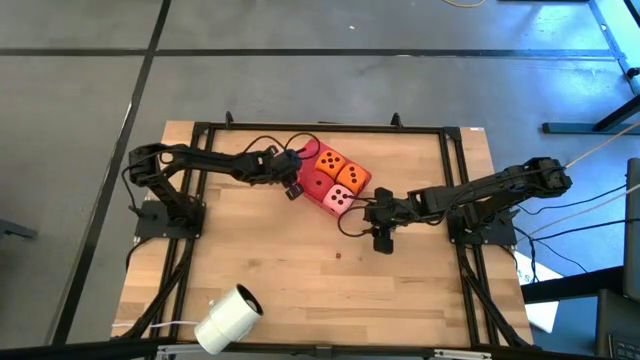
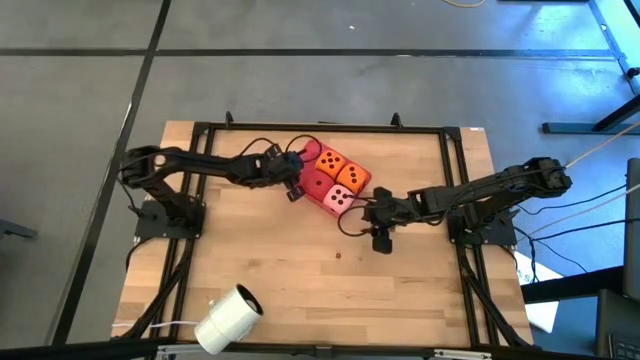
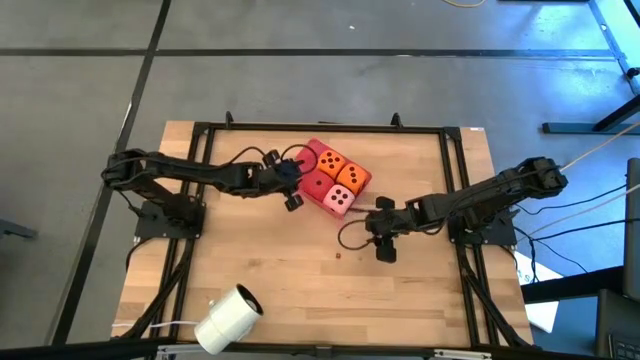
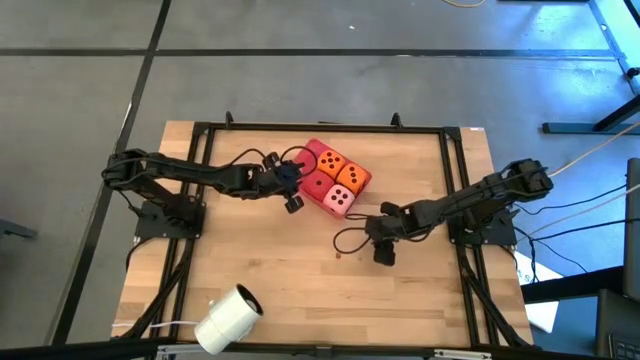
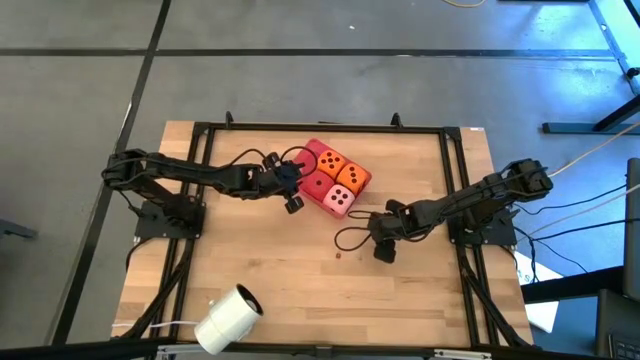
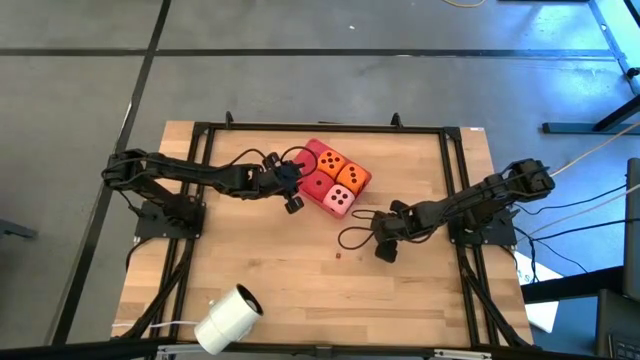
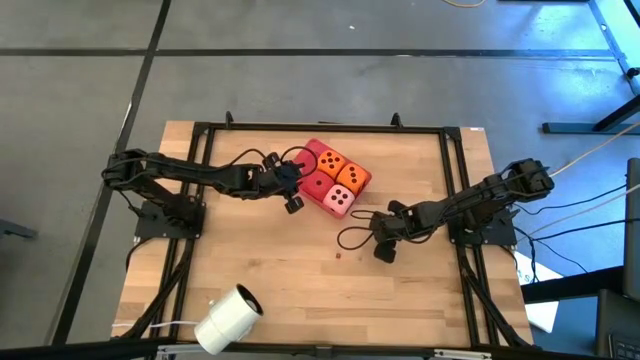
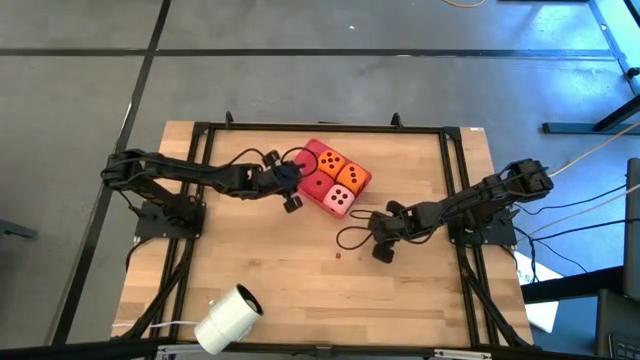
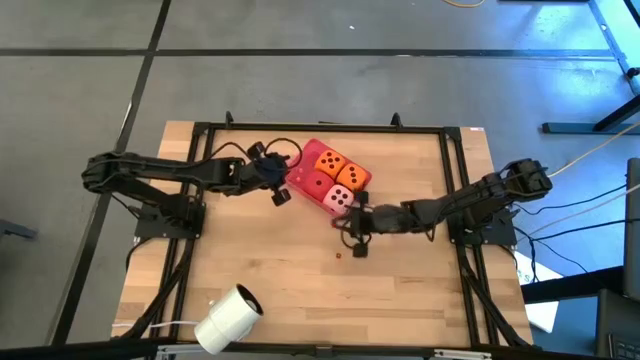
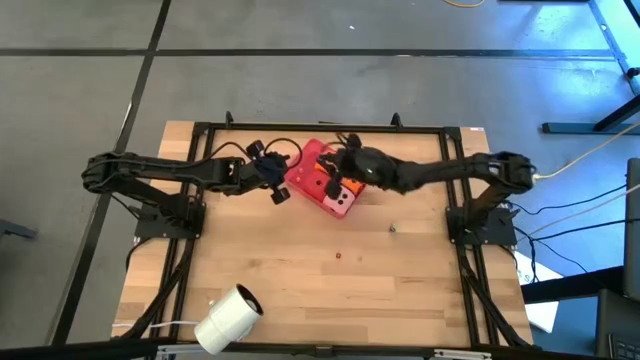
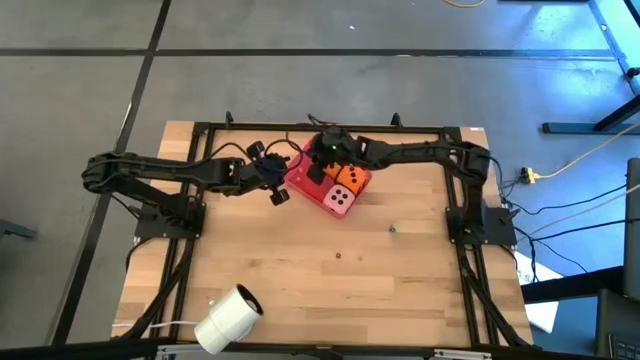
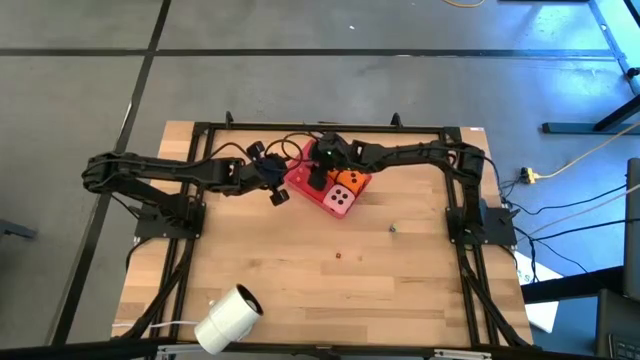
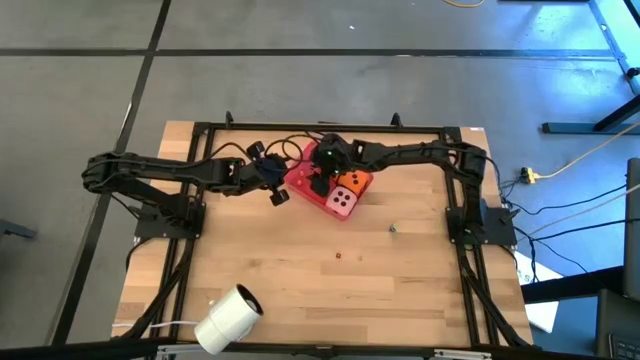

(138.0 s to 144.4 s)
Task: Pick & Place Dice
Put the left small blue die into the red bin

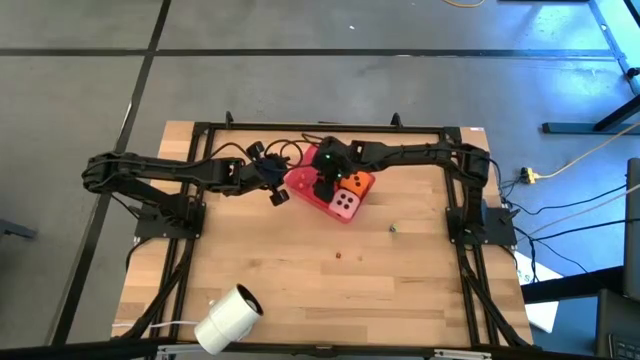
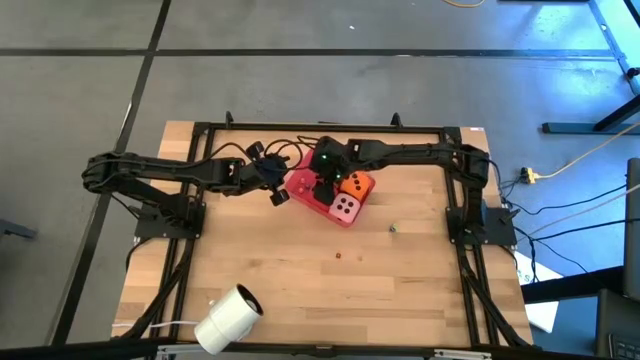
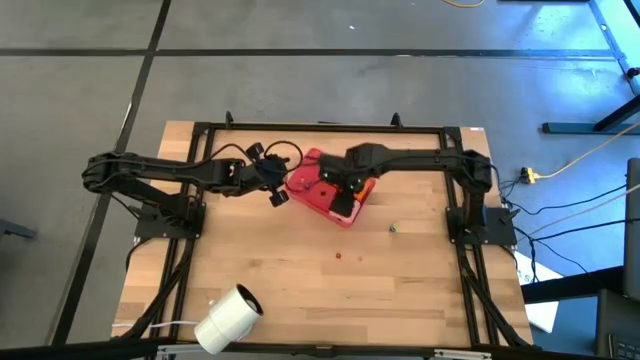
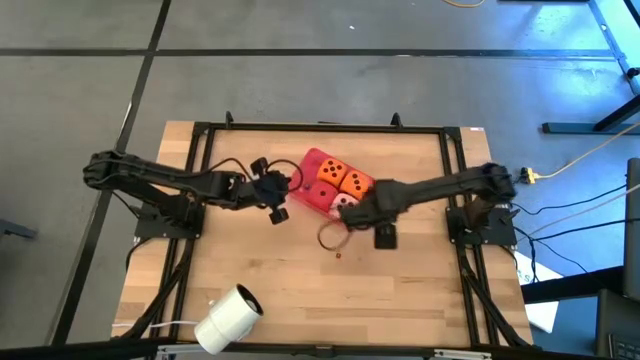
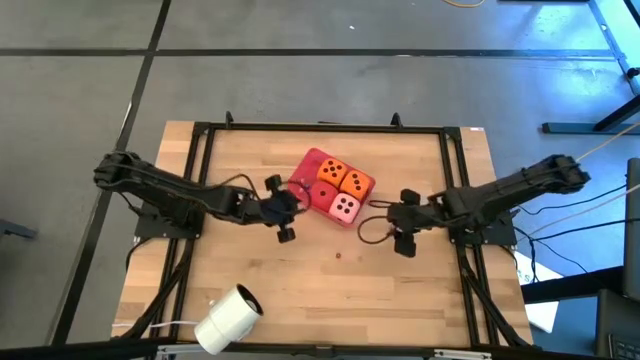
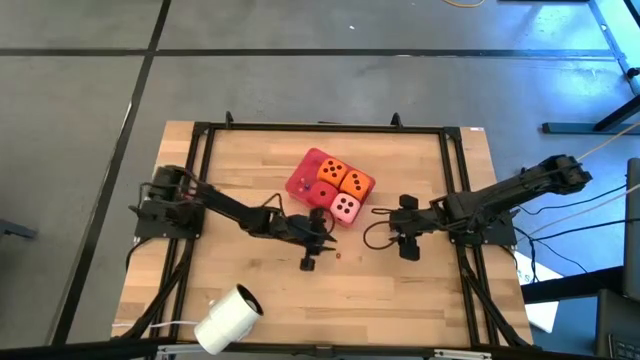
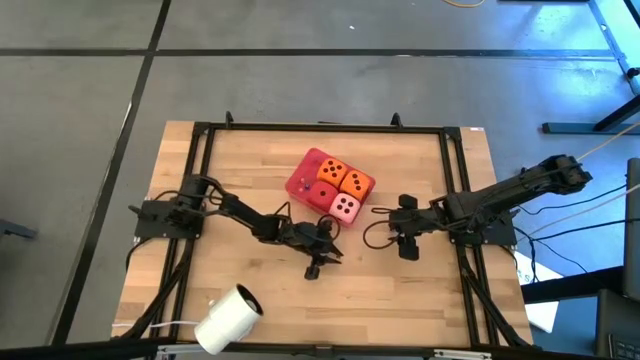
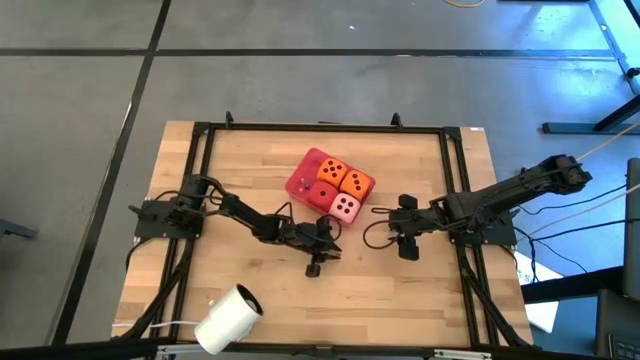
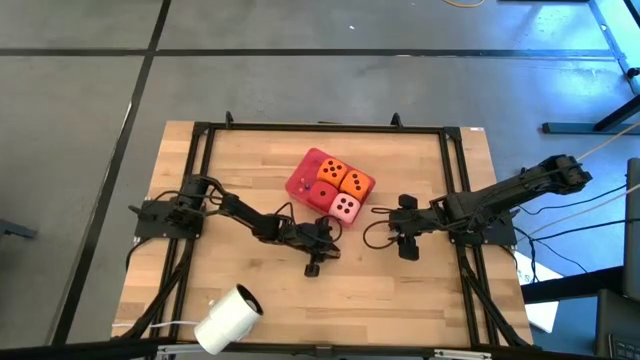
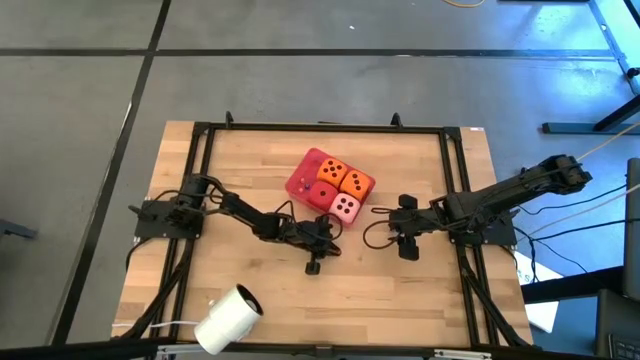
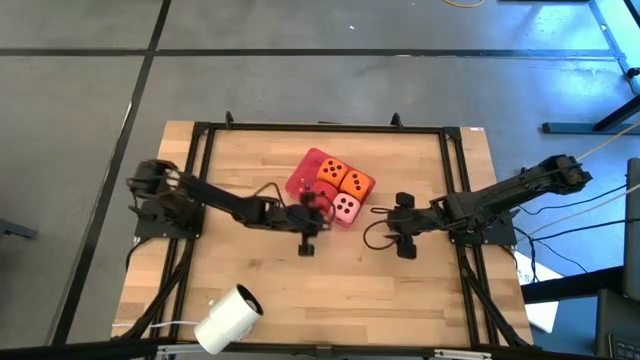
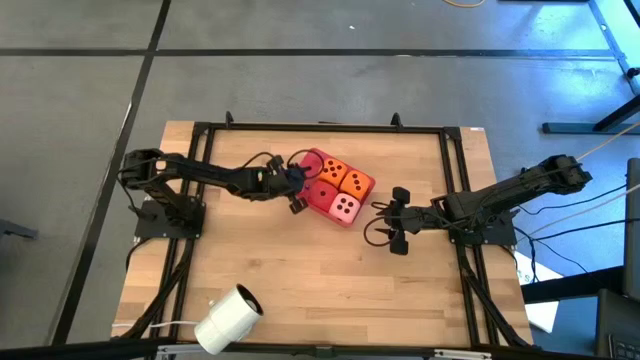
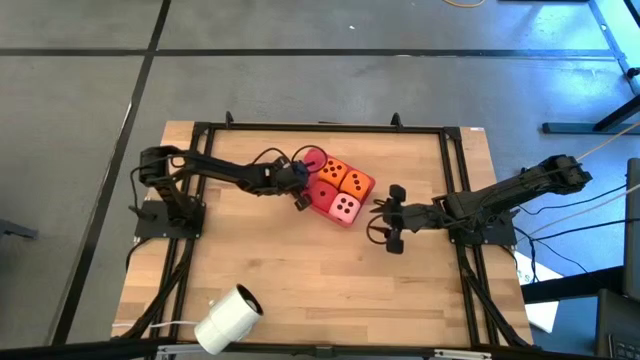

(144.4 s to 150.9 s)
Put the small red die into the red bin

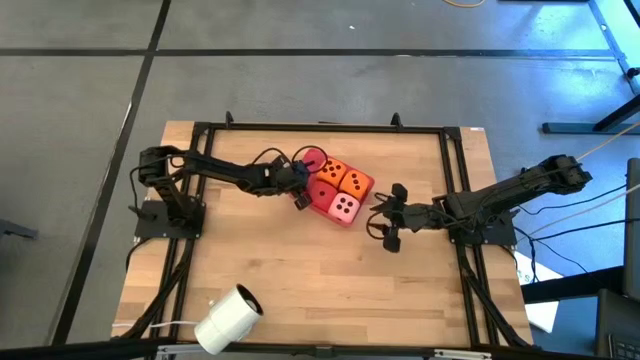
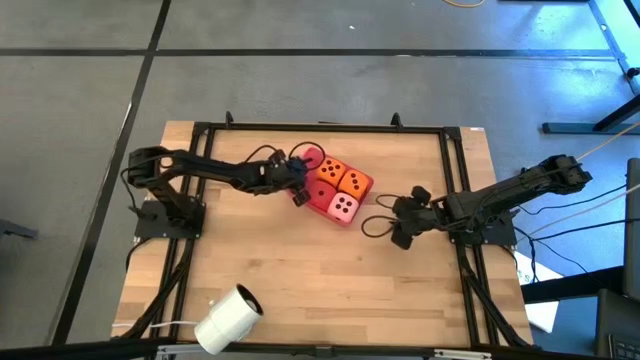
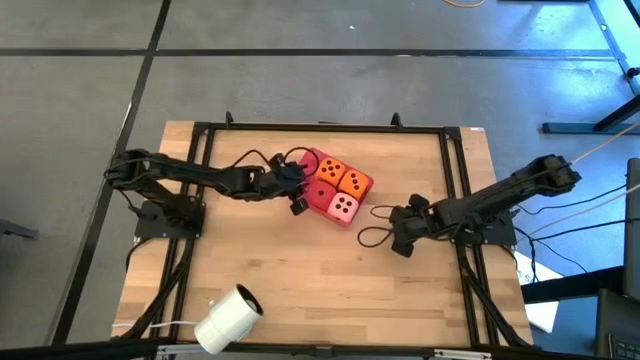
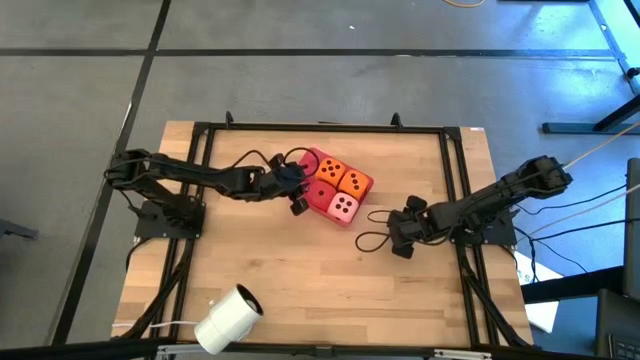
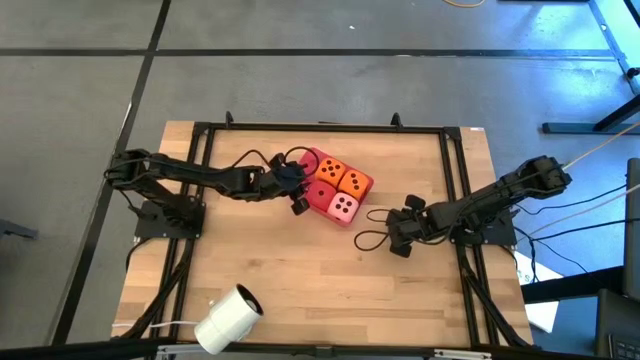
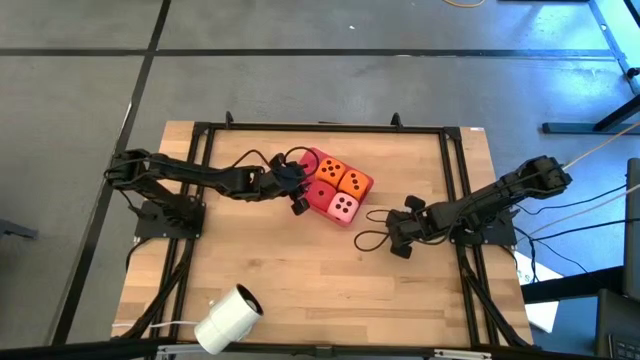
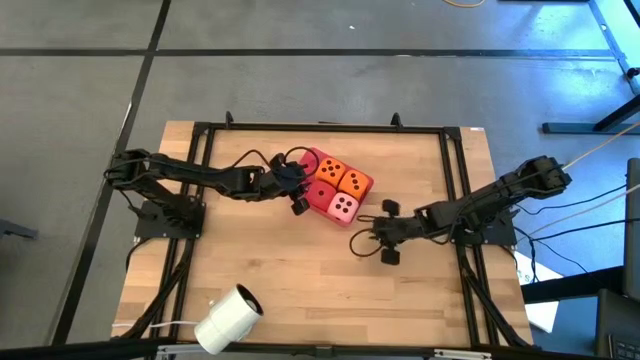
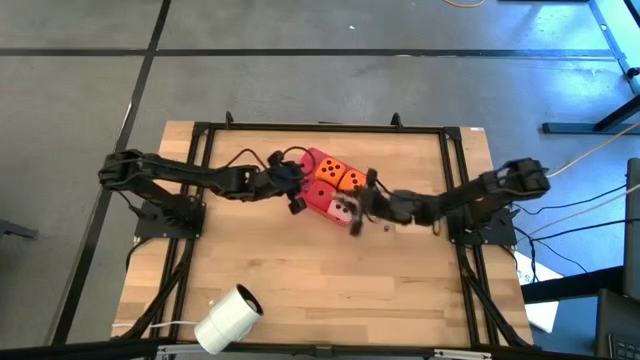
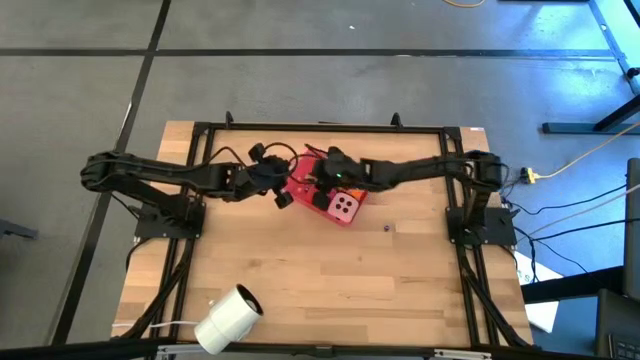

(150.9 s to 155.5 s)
Put the small light green die into the red bin

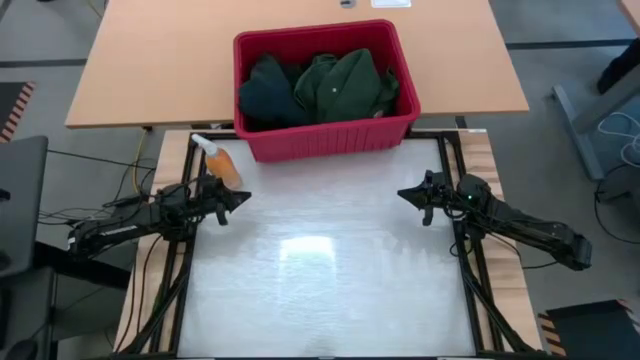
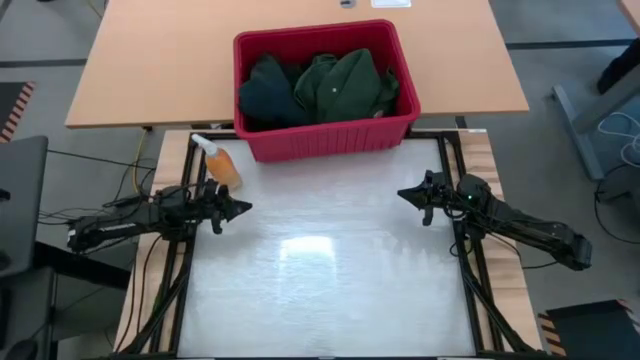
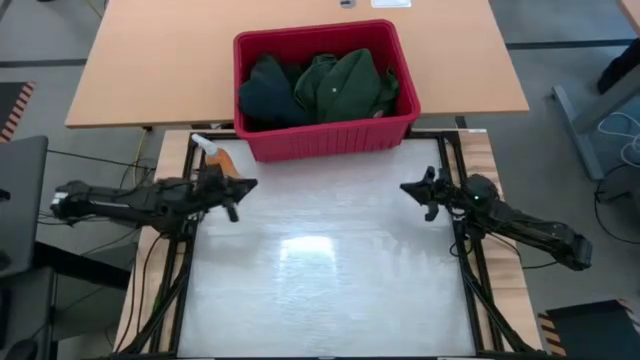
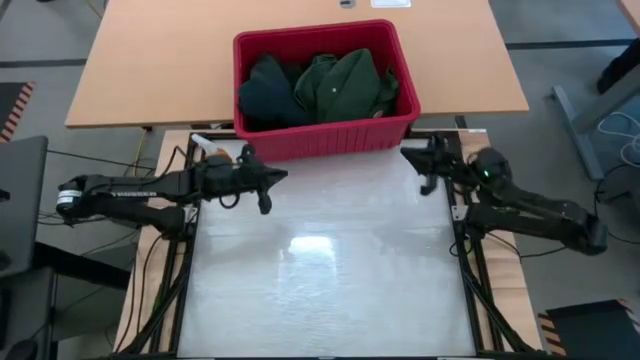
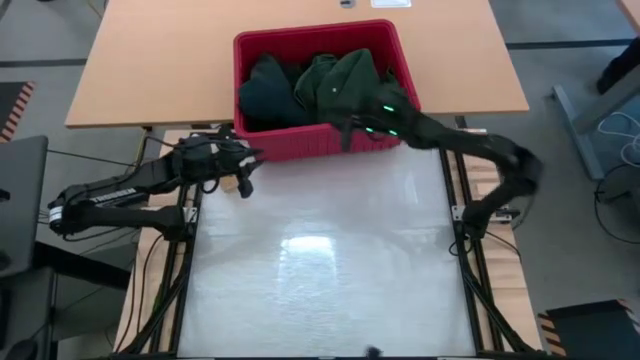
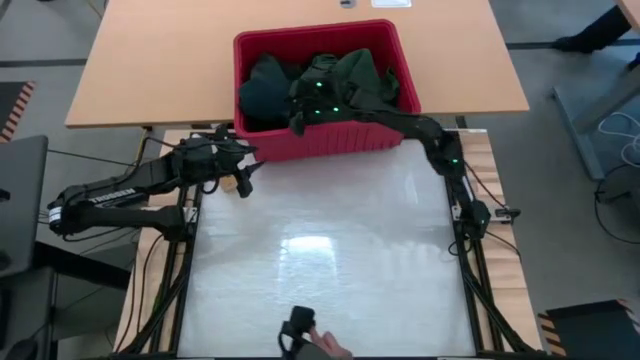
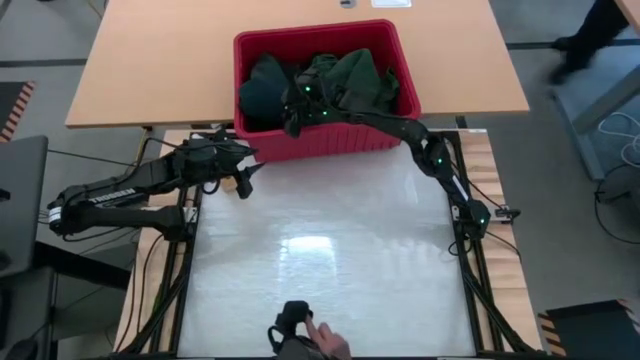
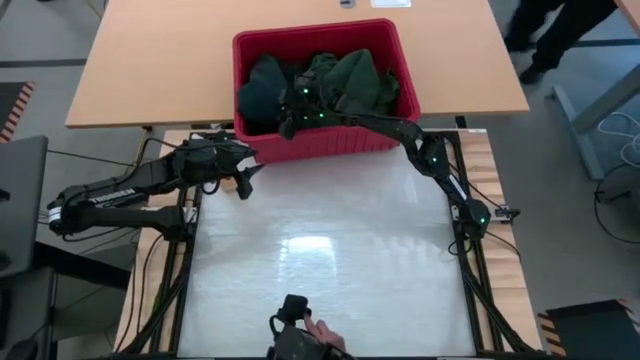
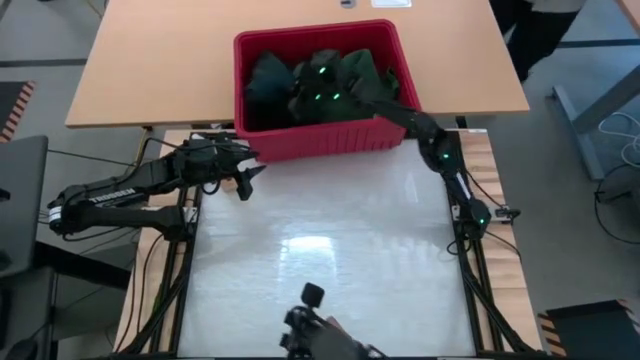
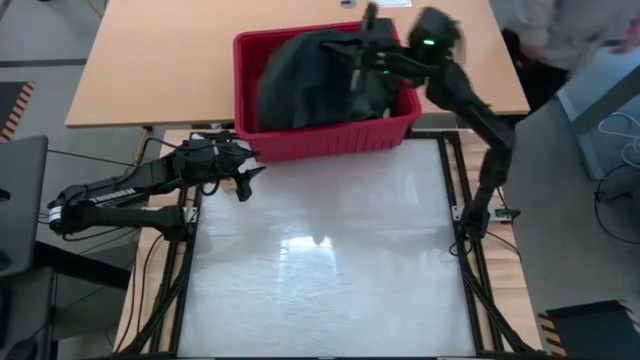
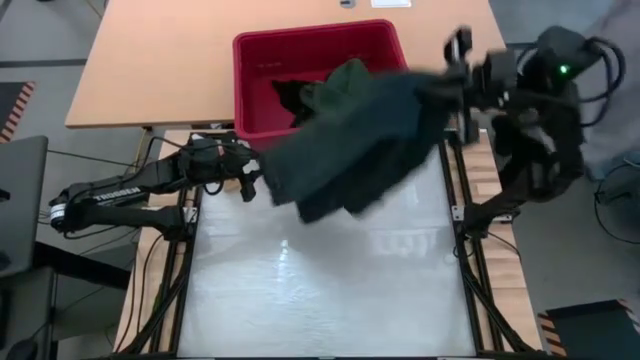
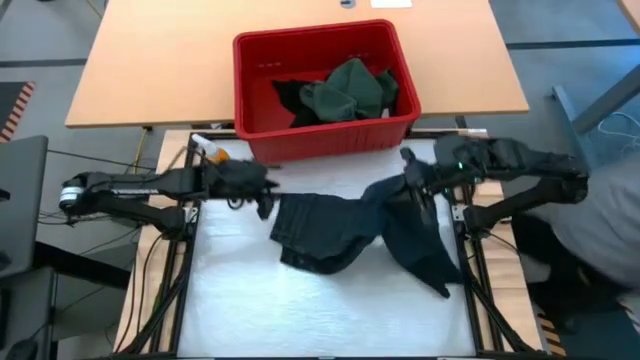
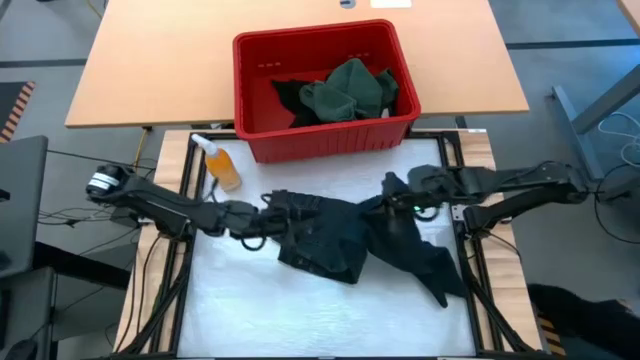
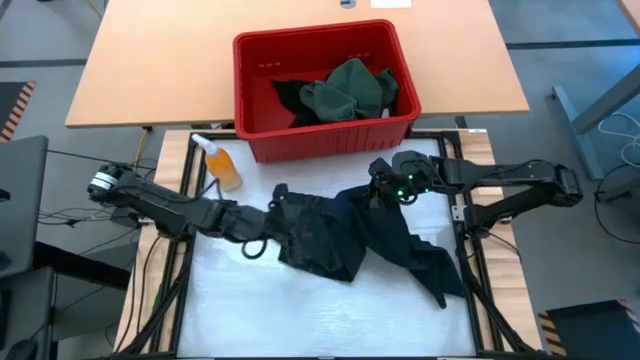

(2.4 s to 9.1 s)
Task: Fold laundry
Remove the dark blue pants from the red laundry bin onto the table
